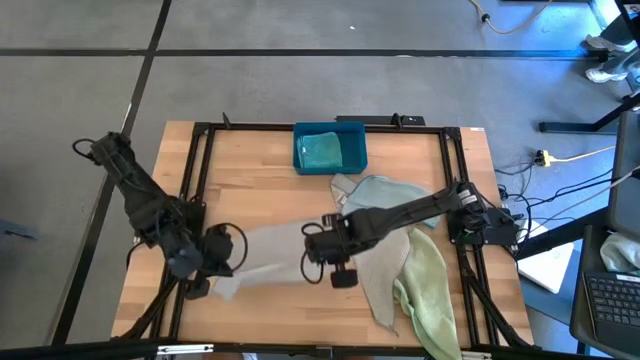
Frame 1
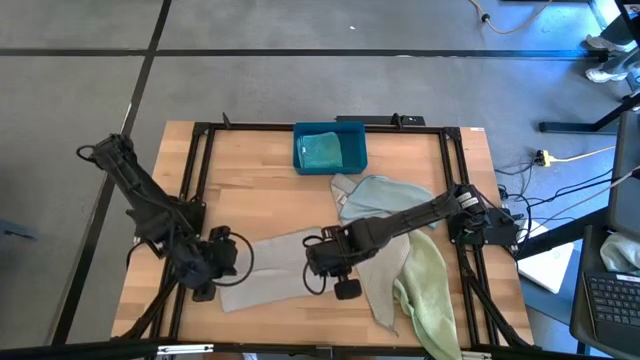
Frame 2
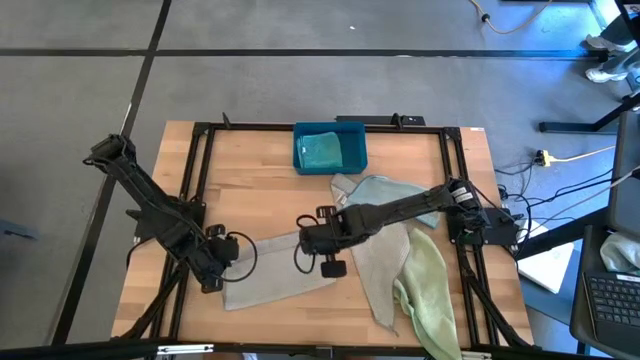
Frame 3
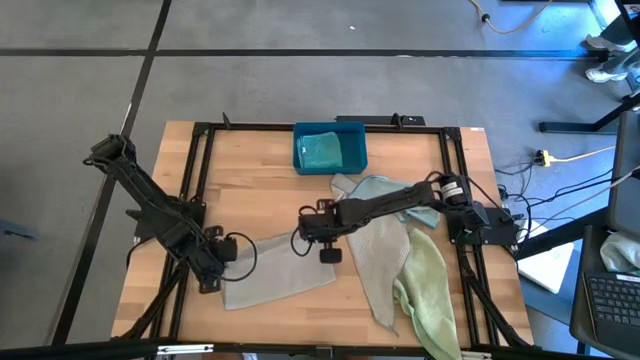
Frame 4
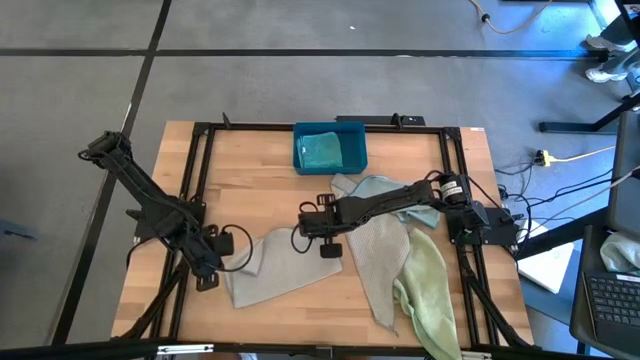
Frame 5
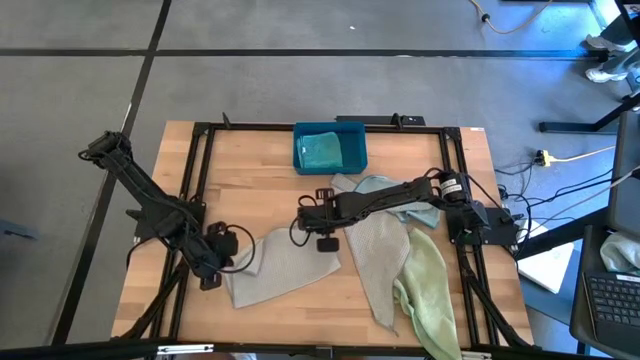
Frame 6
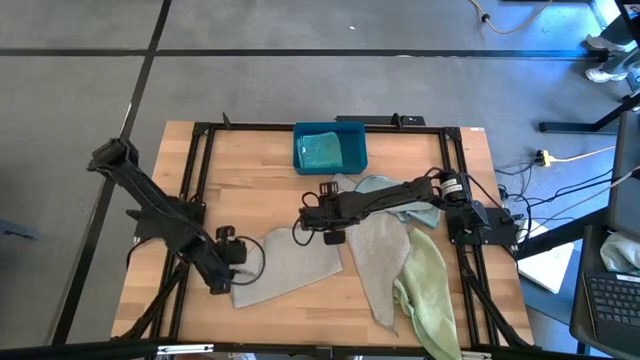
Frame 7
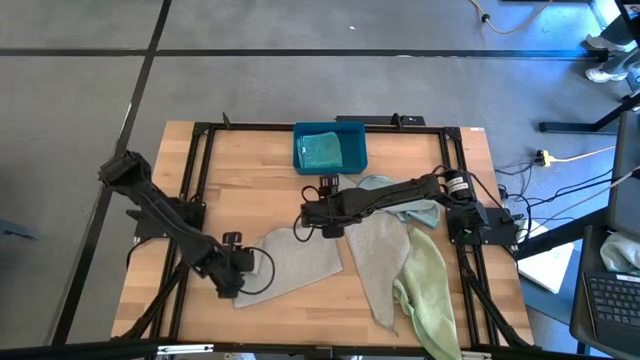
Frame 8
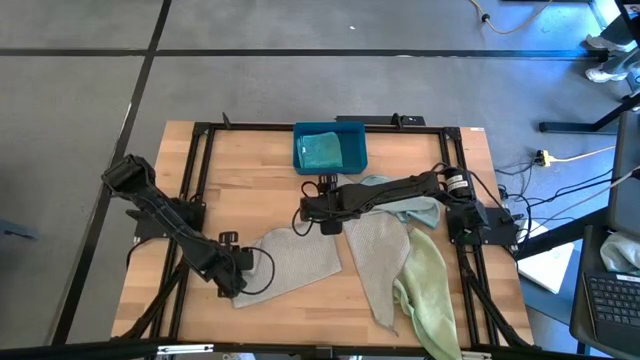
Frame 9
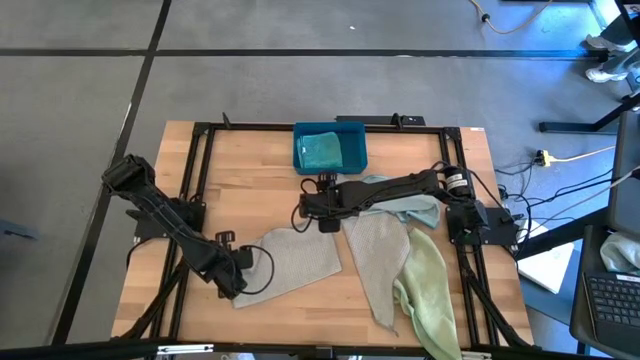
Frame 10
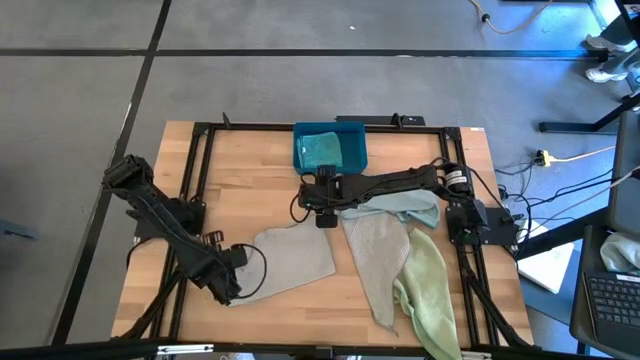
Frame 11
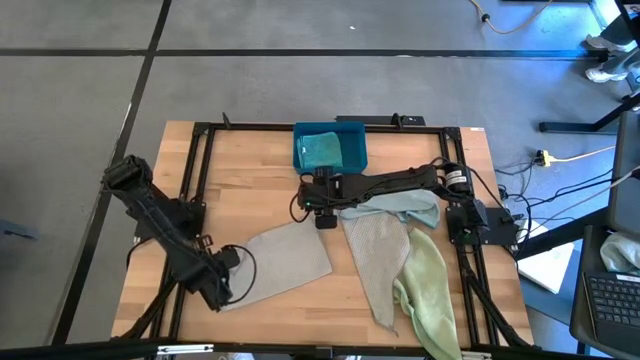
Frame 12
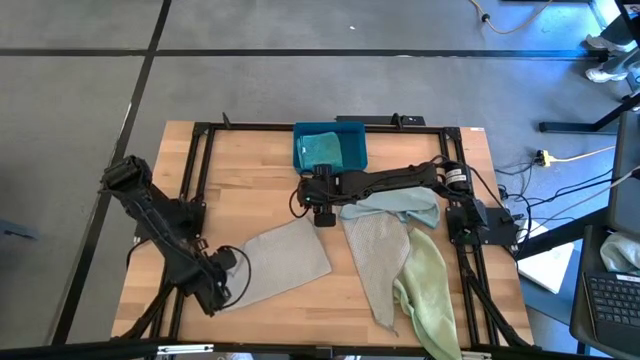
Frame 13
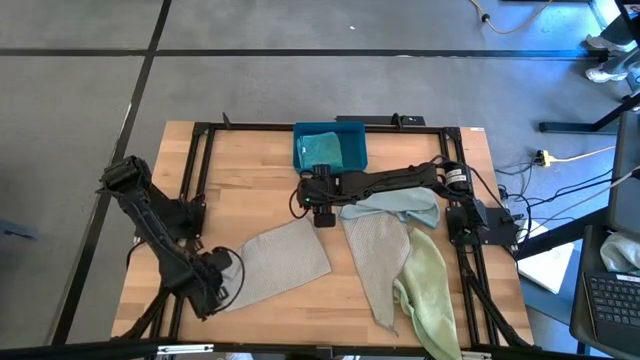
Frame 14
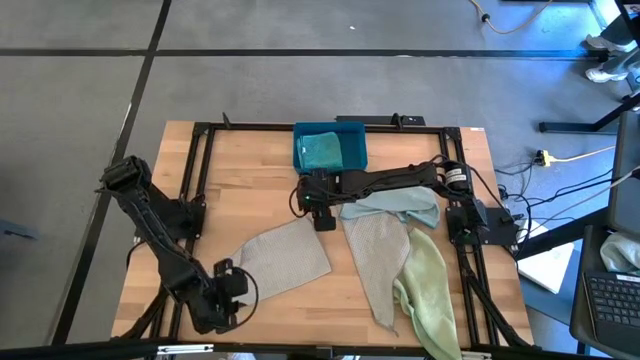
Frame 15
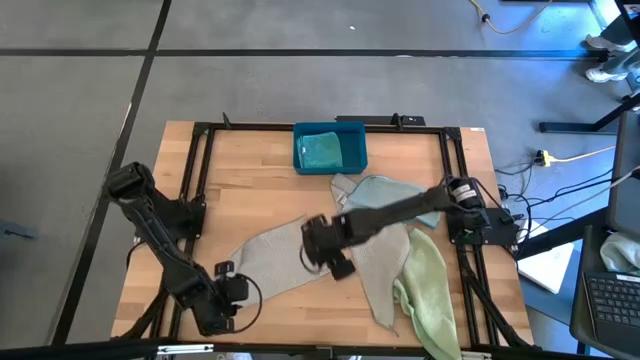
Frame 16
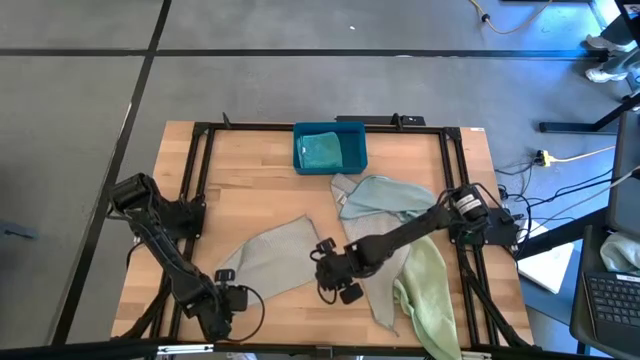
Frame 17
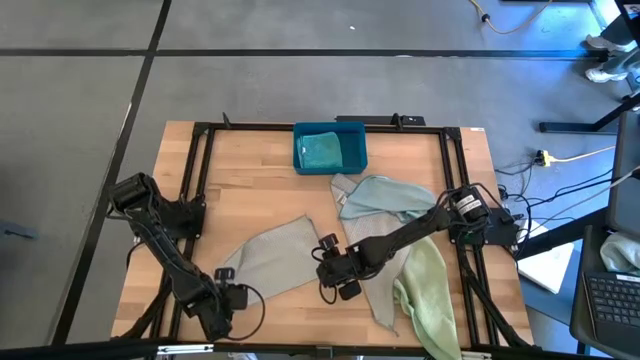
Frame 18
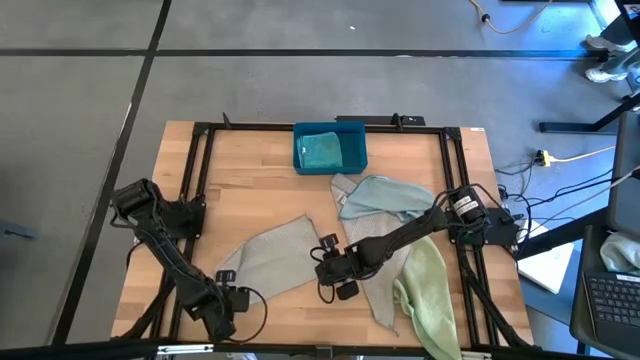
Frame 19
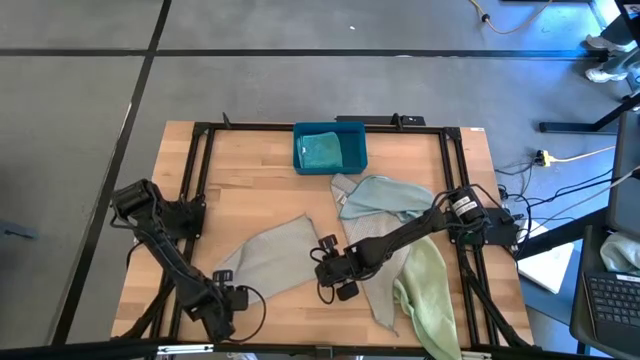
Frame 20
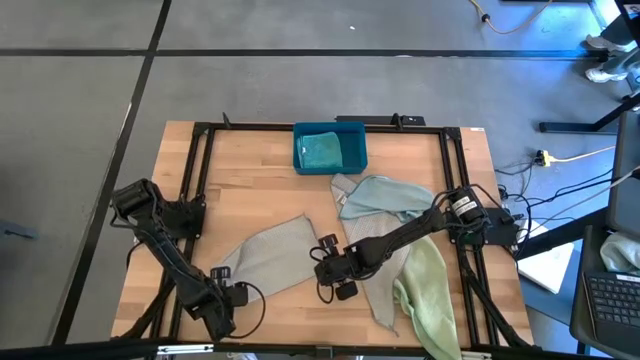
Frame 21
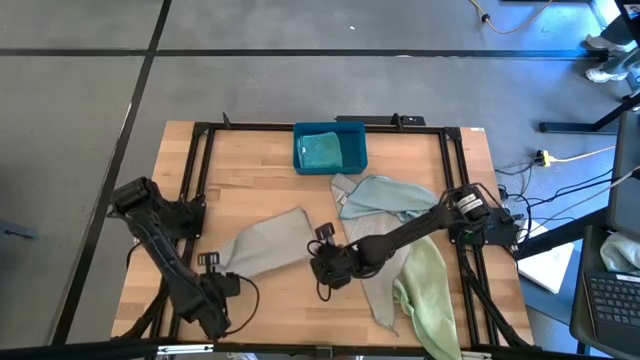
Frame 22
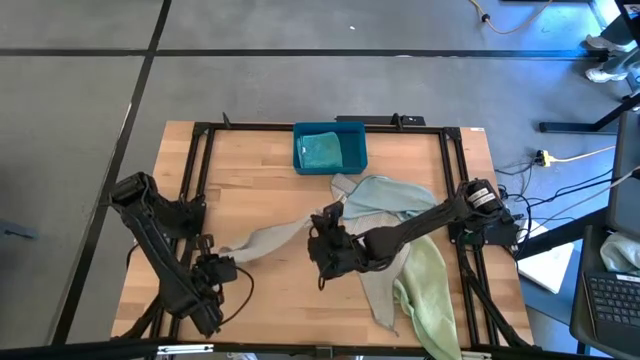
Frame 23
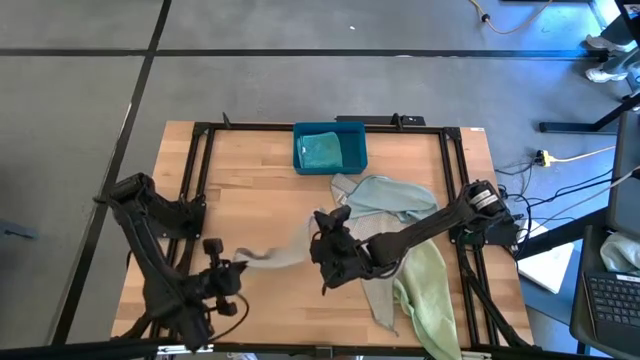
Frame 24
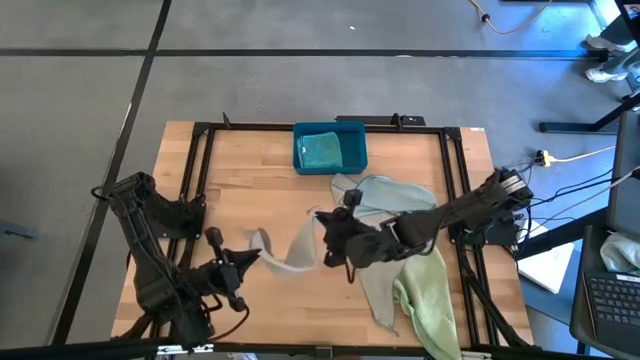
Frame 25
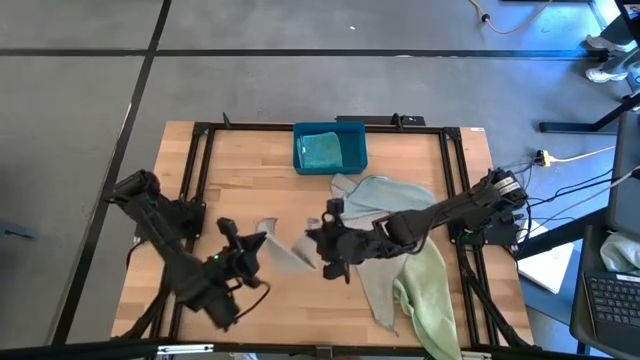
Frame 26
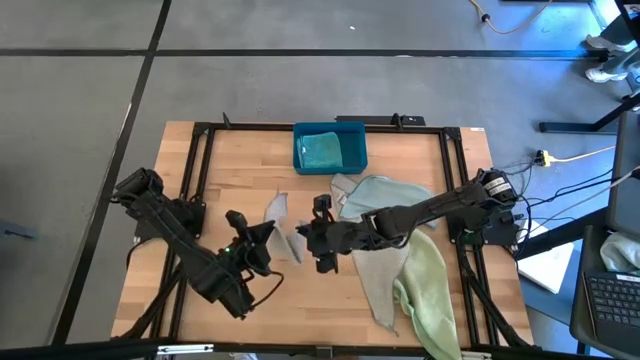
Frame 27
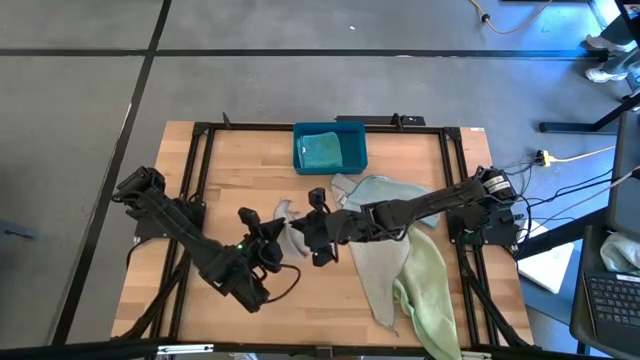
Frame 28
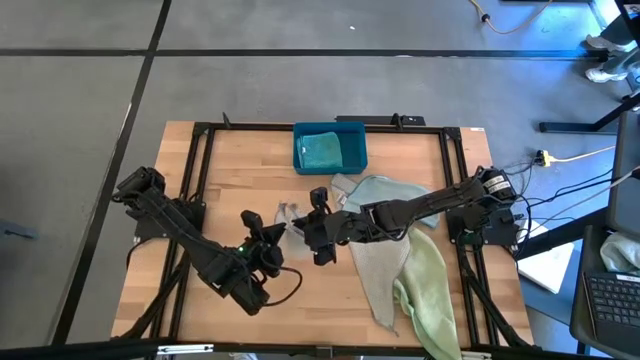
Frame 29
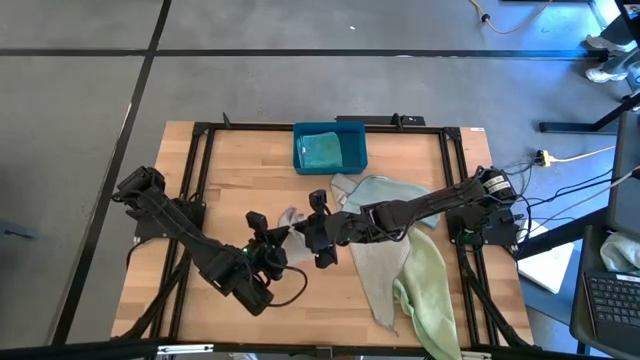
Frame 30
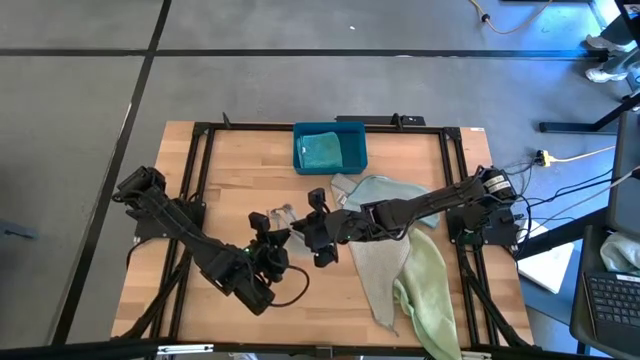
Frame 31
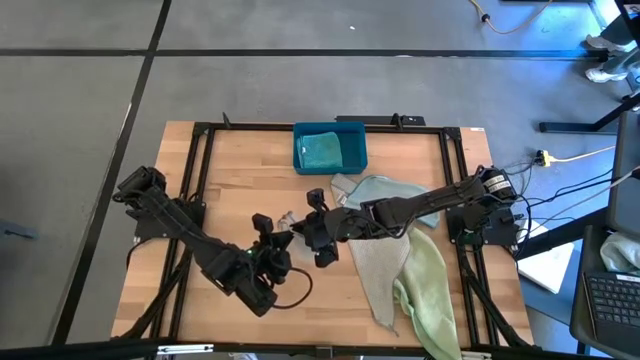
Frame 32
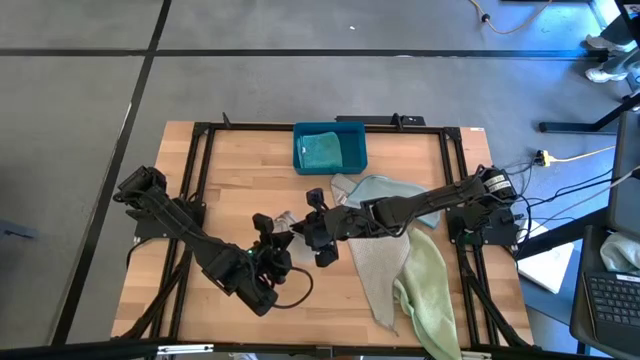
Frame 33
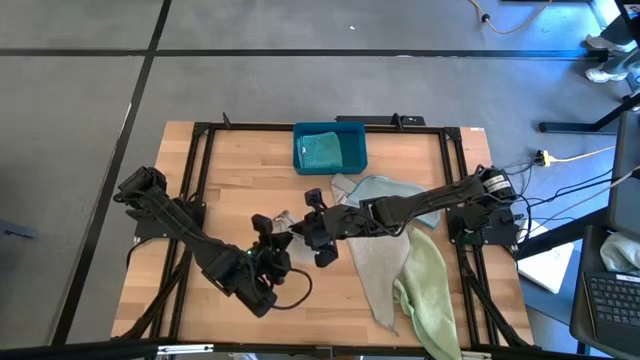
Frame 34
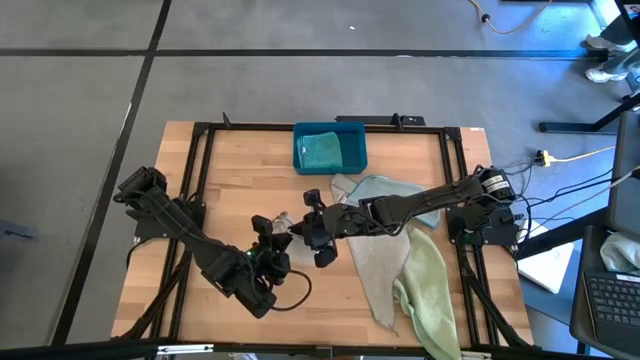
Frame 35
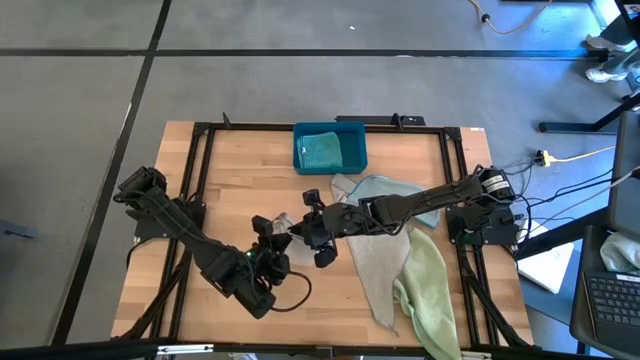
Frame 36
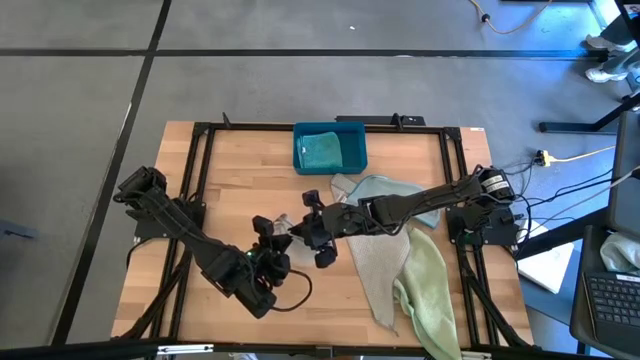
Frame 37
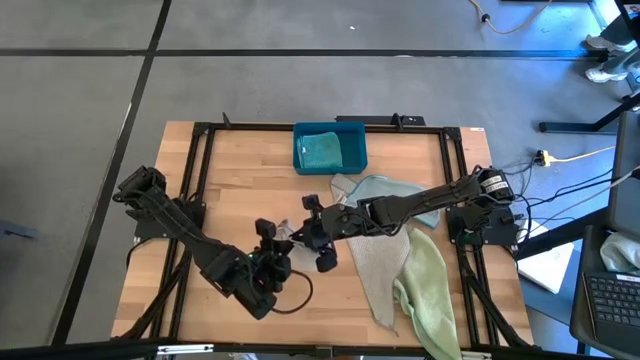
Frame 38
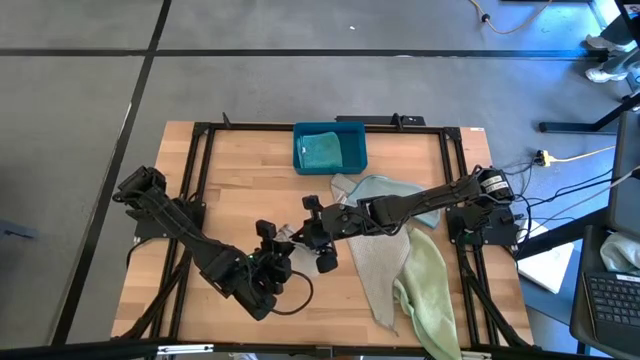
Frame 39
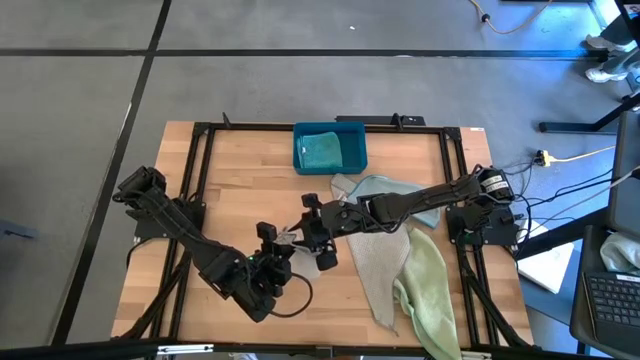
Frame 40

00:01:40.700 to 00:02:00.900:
Task: Fold microfiber towels
Fold the left gray towel

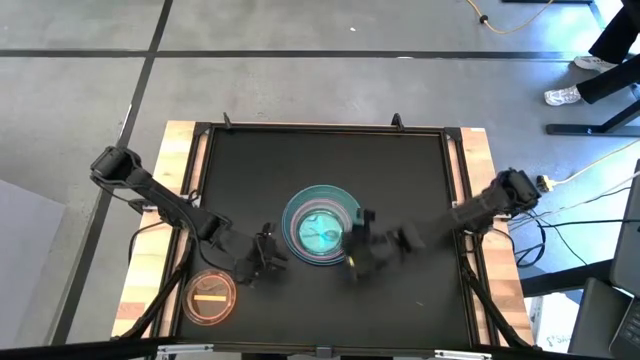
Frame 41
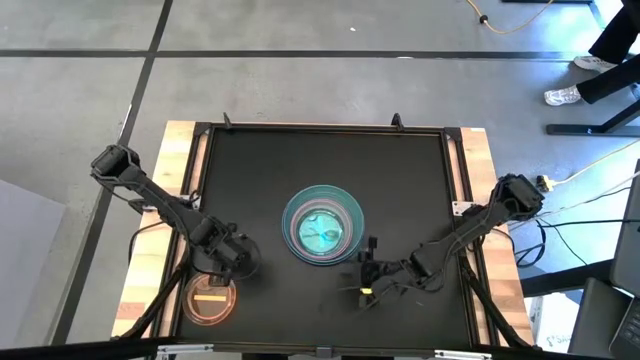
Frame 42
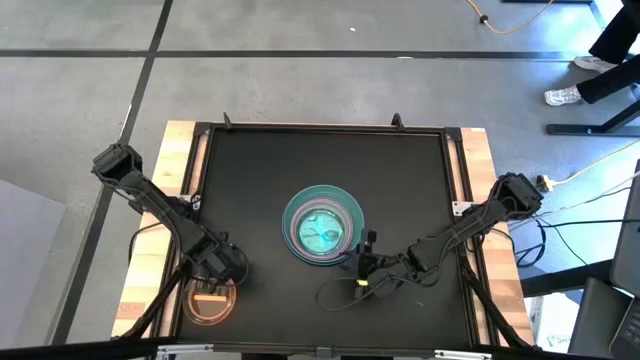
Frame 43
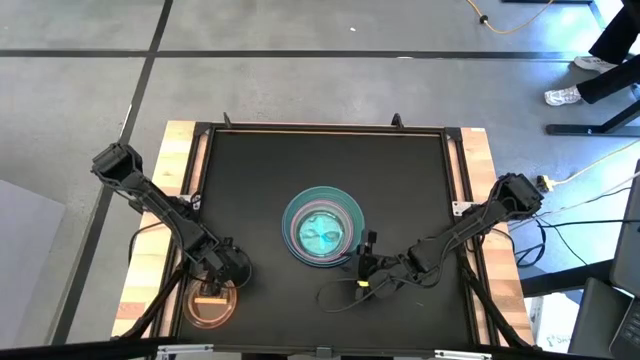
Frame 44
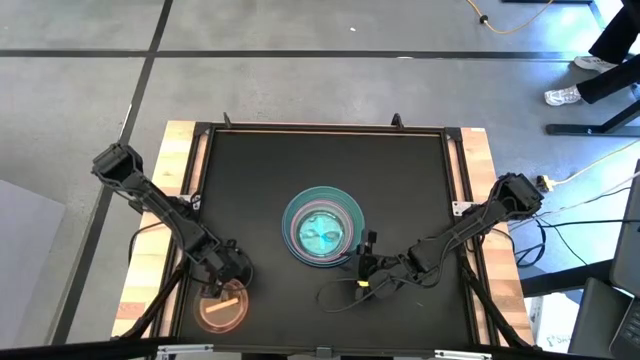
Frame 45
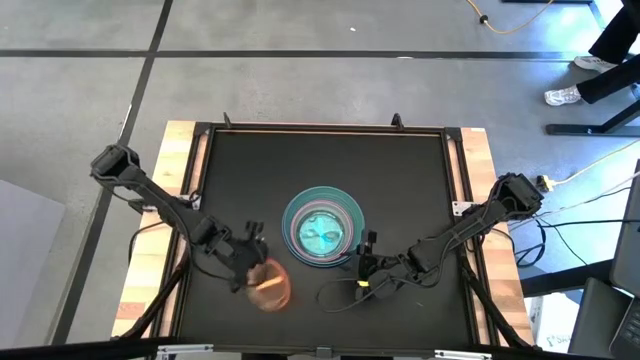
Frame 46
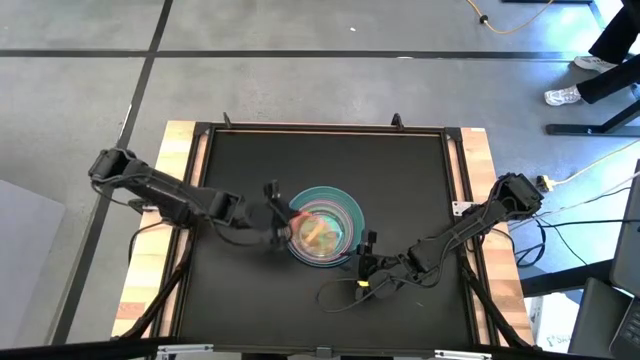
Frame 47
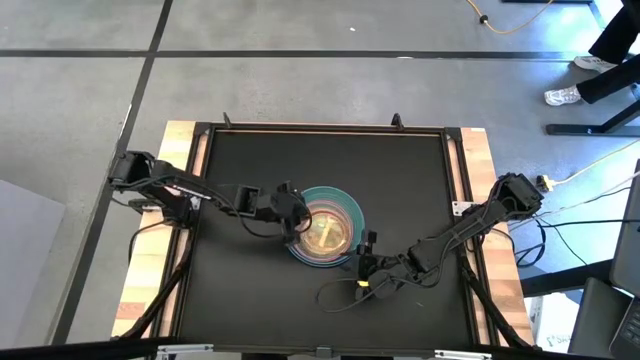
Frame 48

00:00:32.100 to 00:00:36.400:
Task: Stack plastic plates
Stack the orange plate on top of the light blue plate
